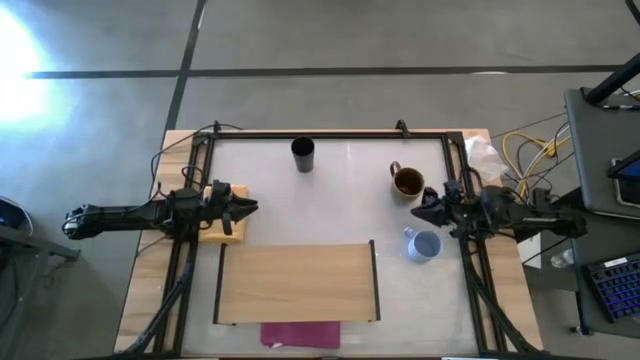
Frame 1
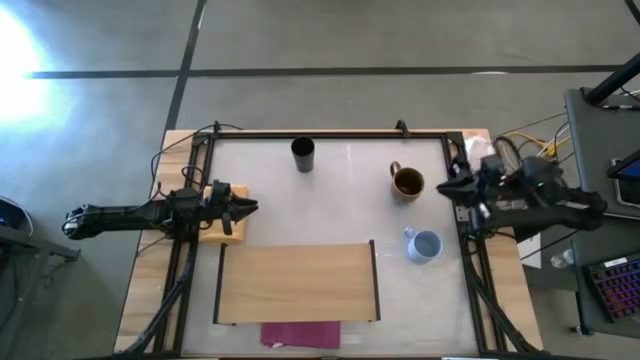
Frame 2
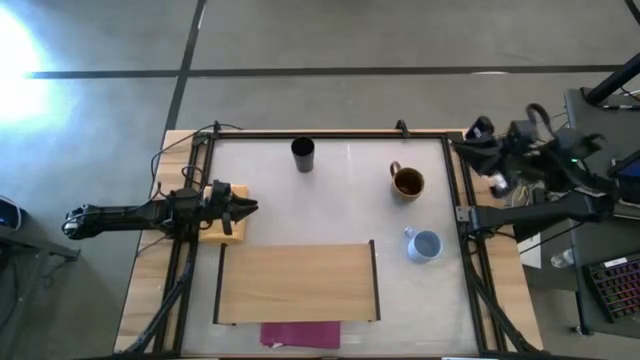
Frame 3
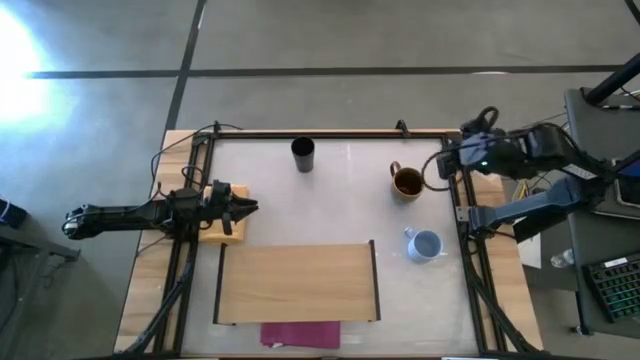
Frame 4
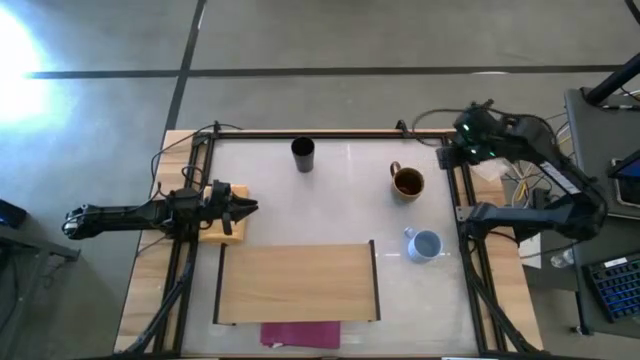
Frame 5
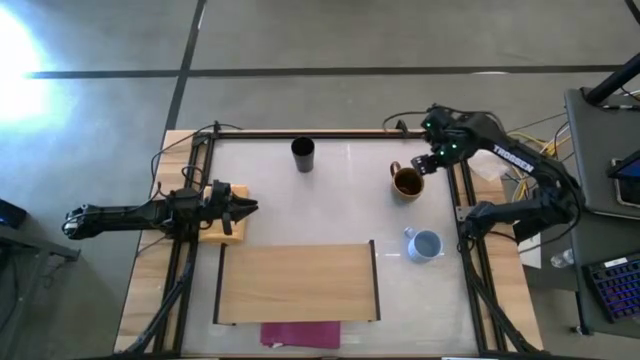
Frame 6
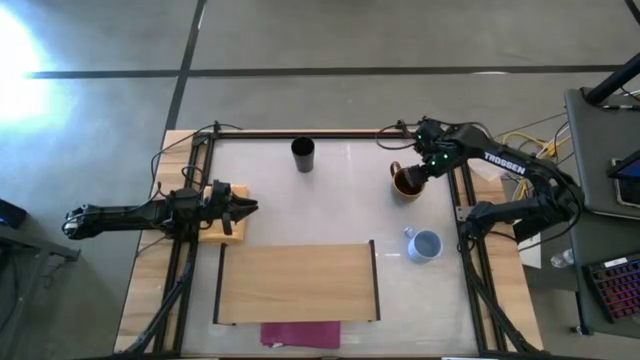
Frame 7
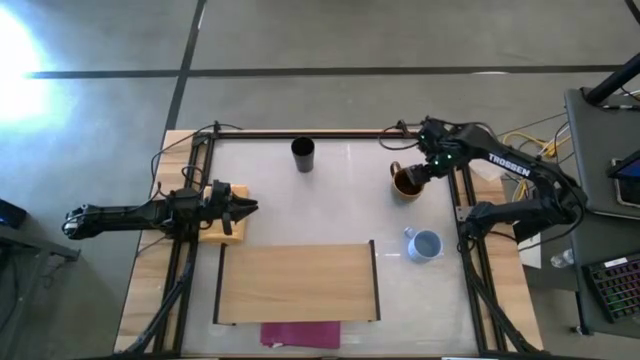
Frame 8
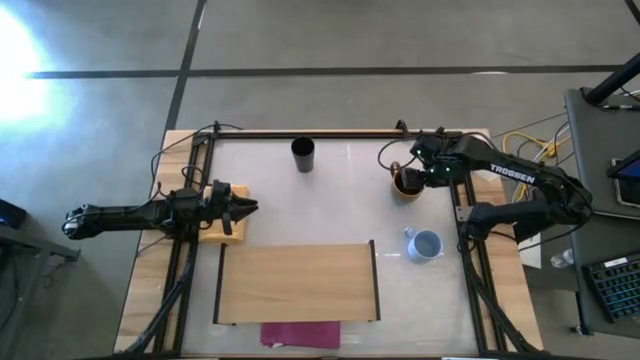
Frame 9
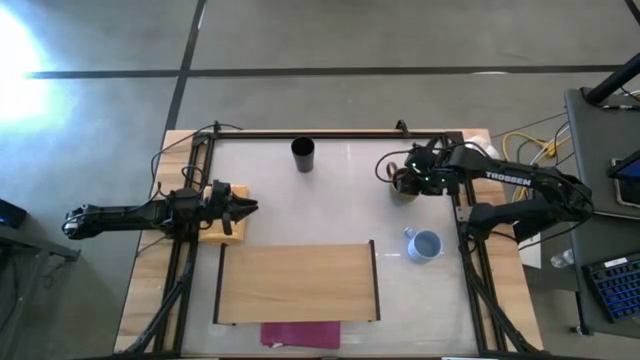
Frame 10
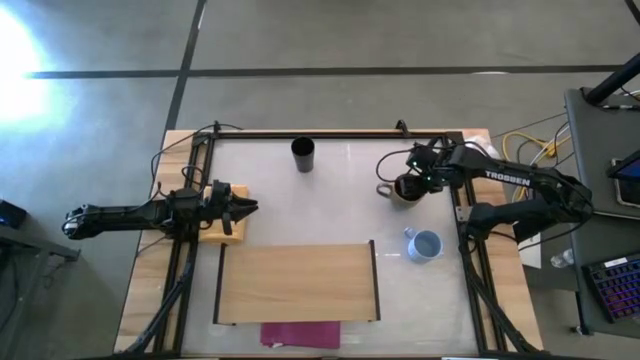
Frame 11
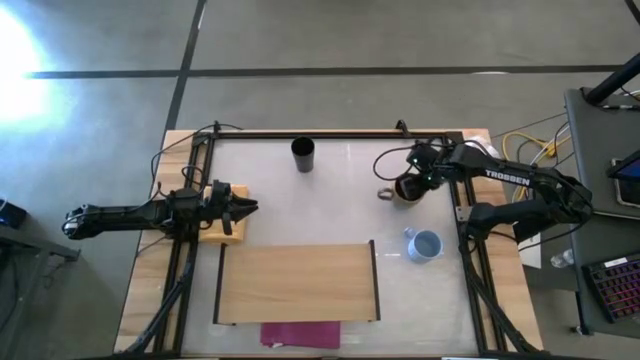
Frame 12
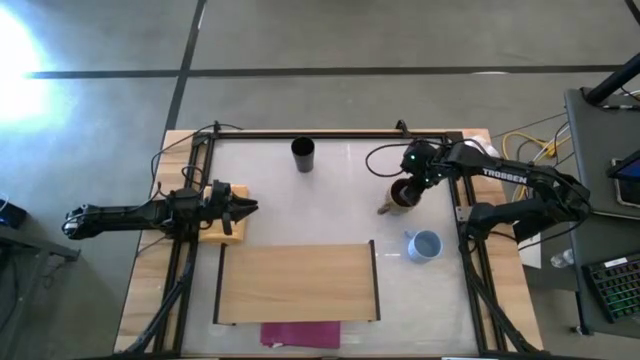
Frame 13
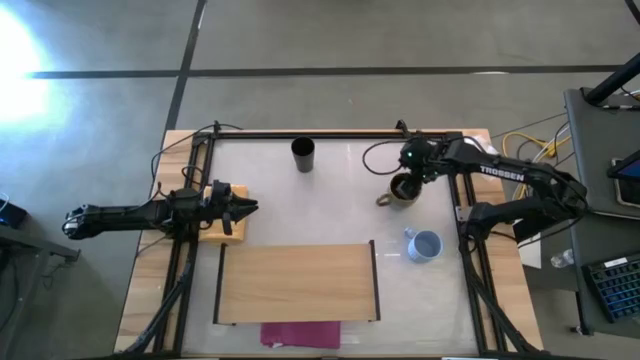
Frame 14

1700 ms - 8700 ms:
Task: Stack small to large cups/mugs on shelf
Put the brown mug on the shelf

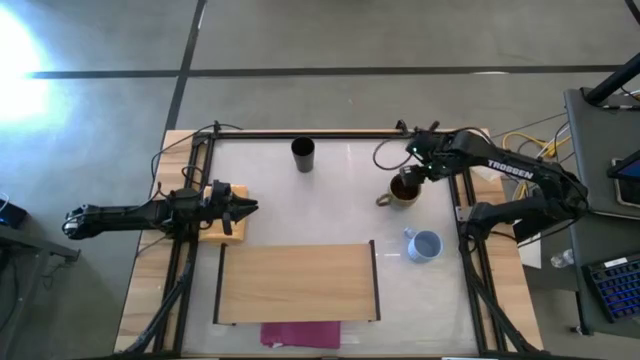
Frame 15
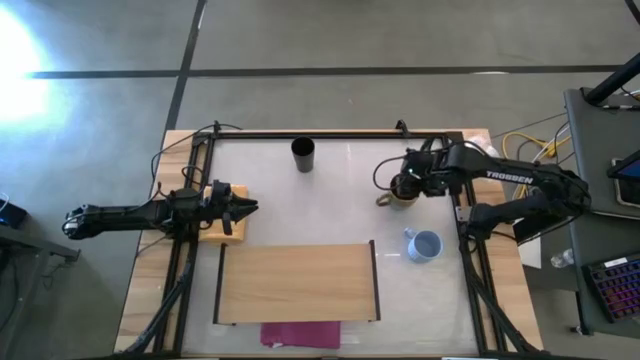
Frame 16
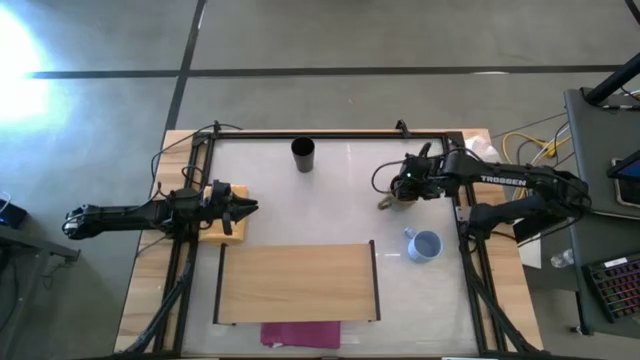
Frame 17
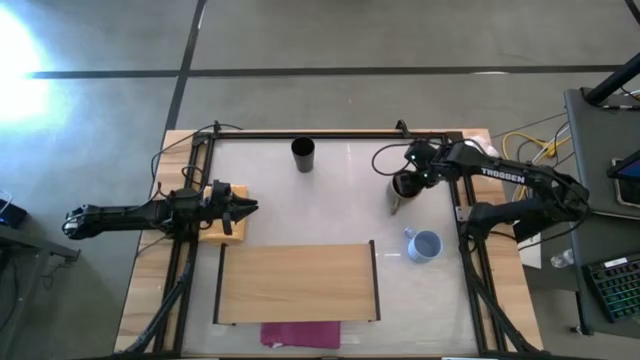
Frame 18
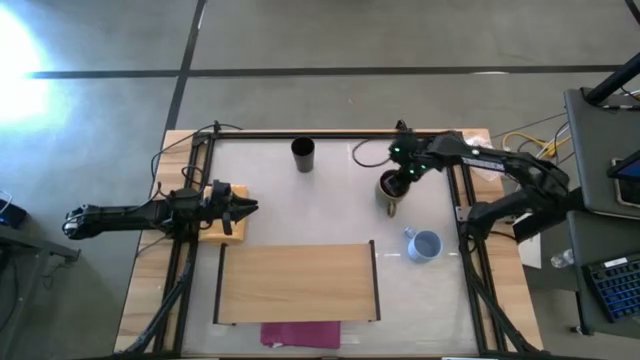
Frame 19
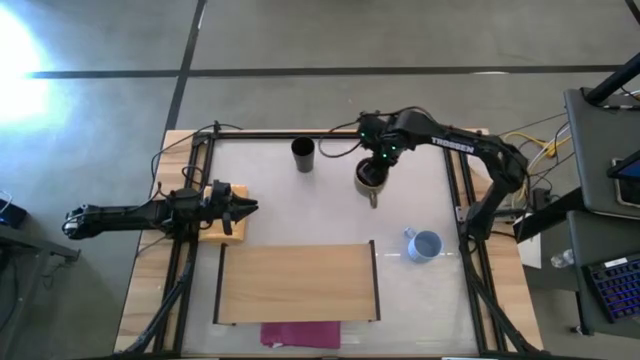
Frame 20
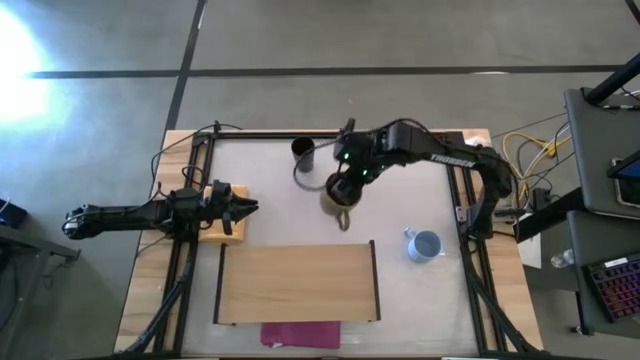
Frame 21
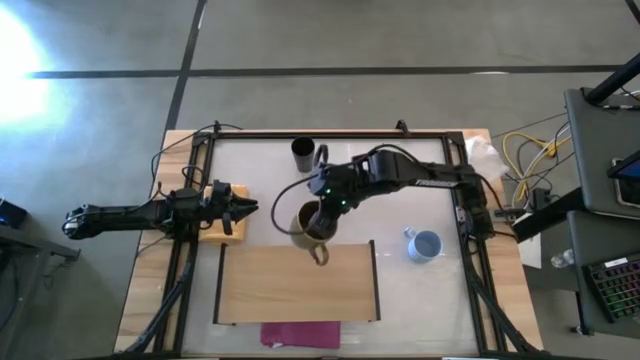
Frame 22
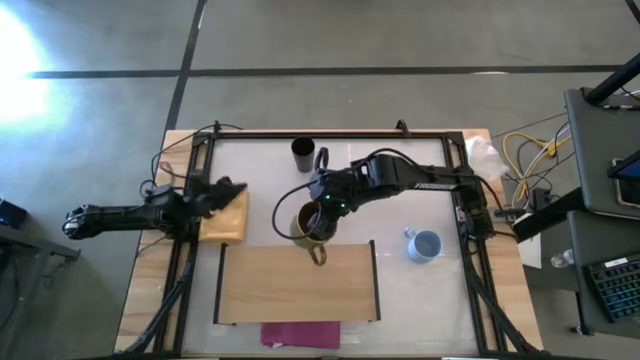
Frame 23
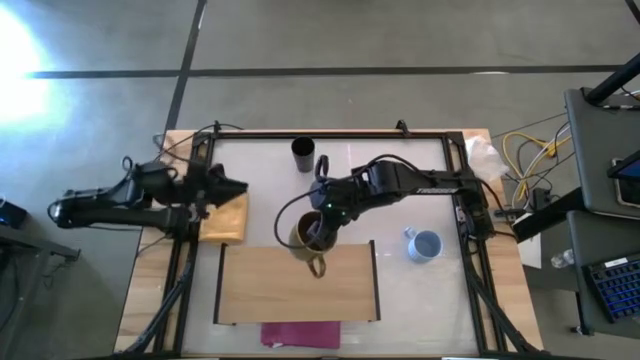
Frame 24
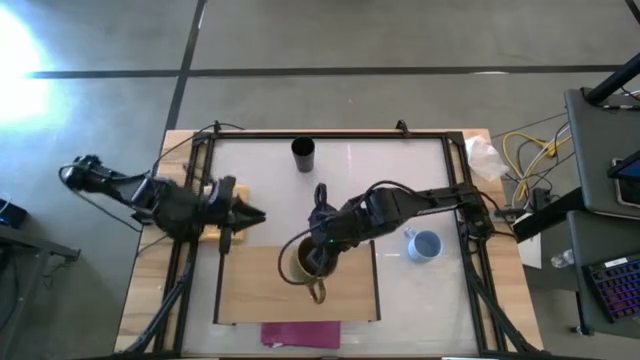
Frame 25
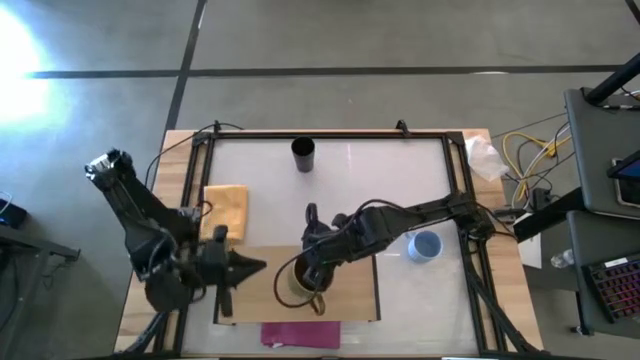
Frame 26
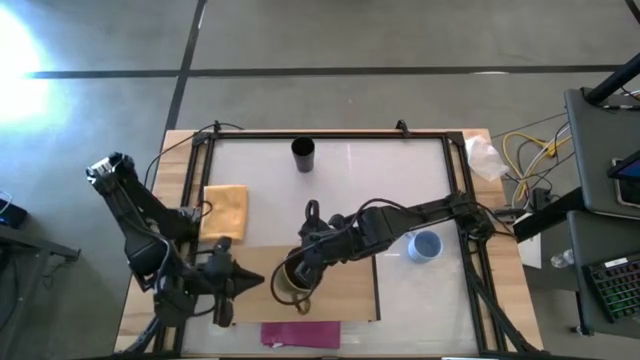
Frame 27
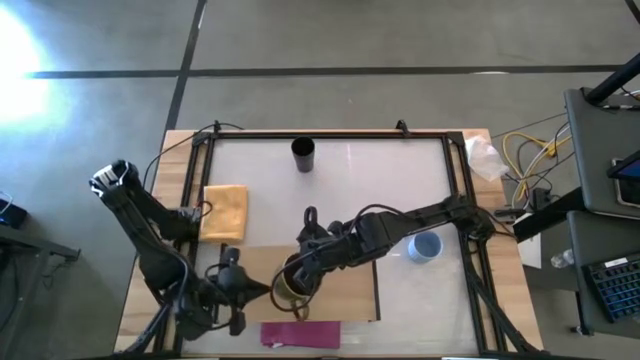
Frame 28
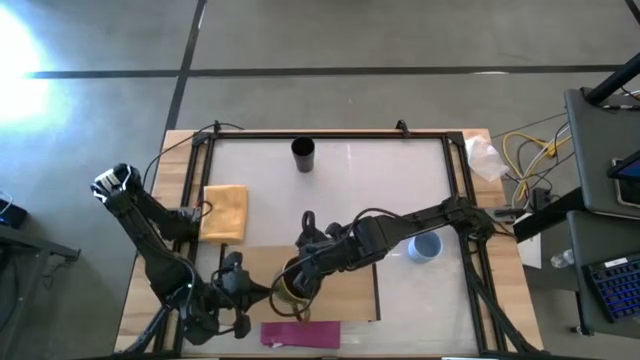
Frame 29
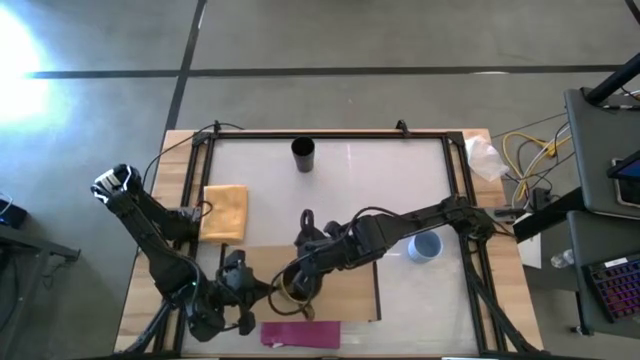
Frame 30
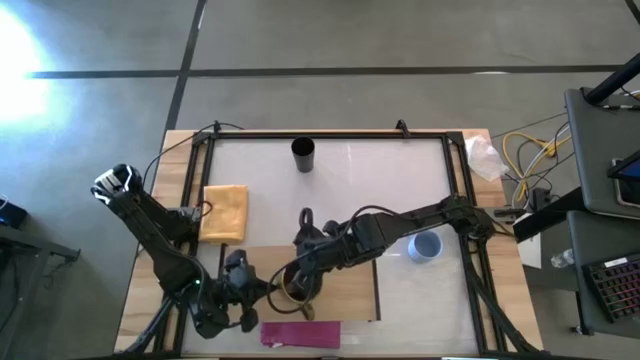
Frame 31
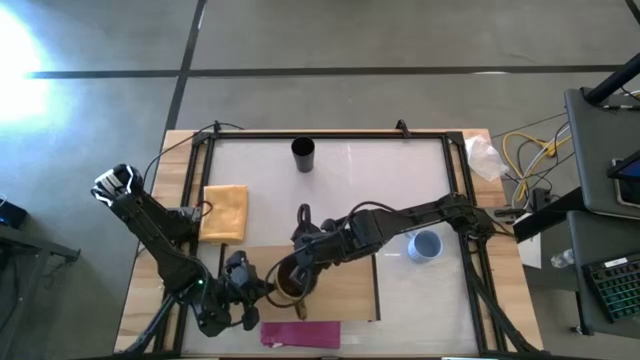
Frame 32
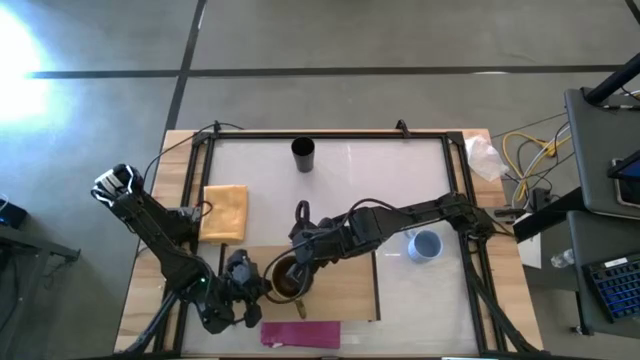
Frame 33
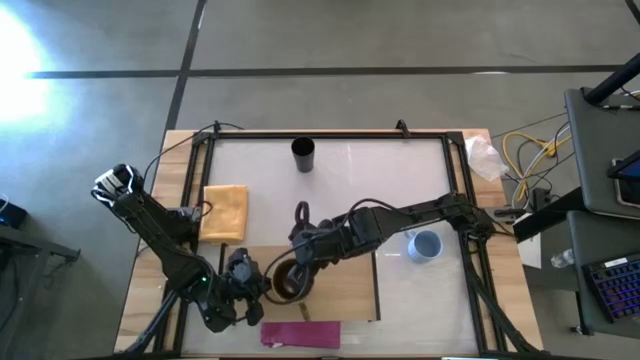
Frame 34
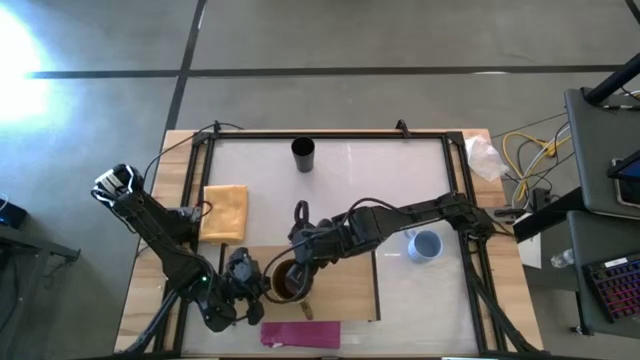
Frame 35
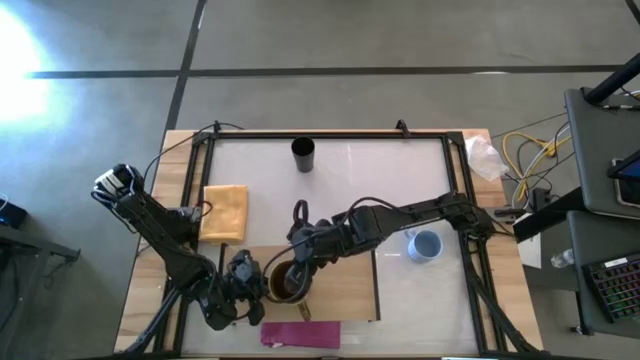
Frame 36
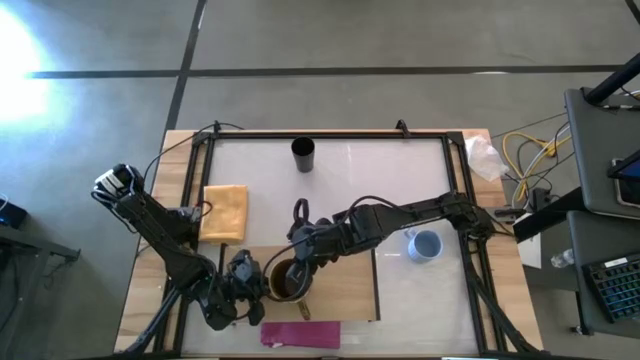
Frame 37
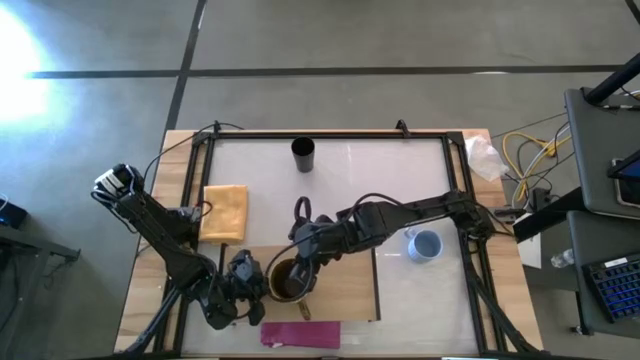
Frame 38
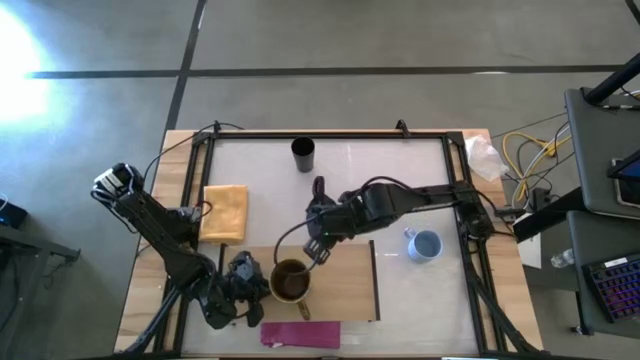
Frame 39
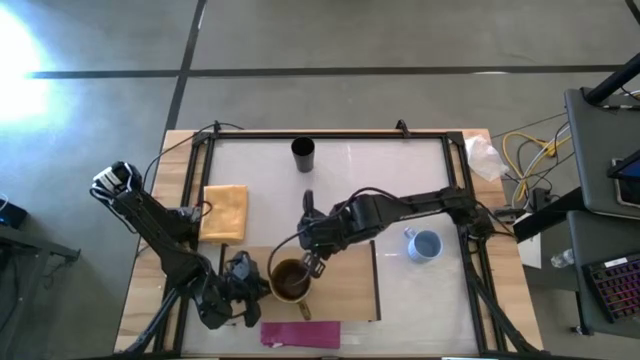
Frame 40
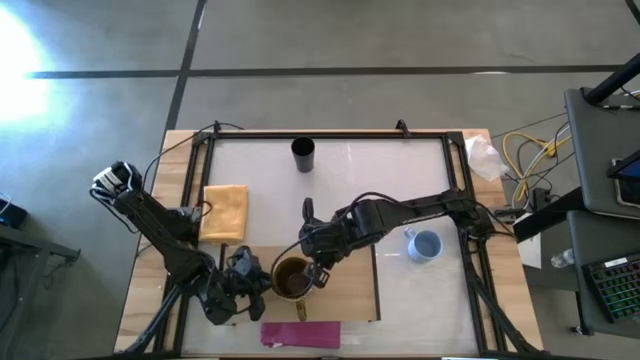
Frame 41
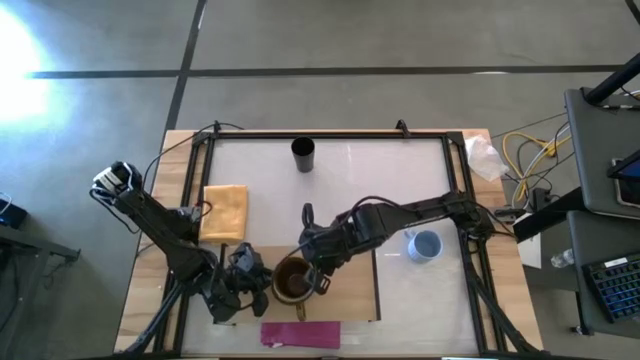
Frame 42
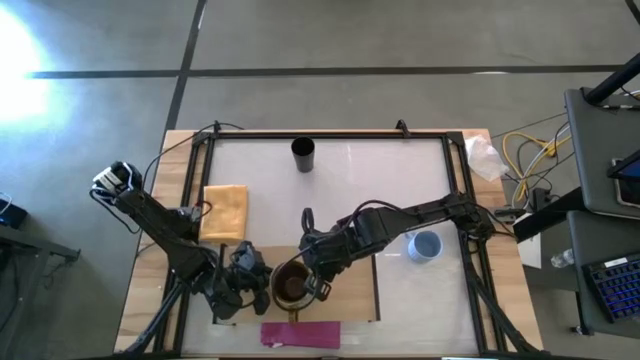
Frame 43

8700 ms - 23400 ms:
Put the brown mug on the shelf
